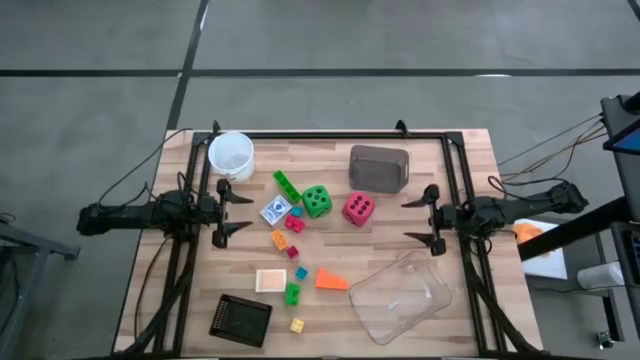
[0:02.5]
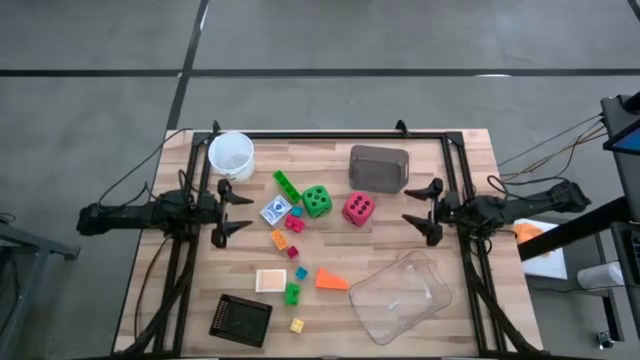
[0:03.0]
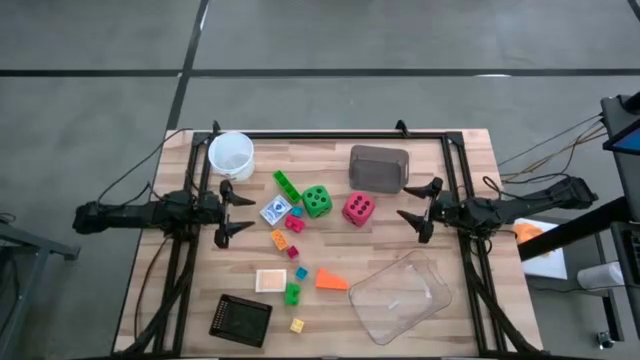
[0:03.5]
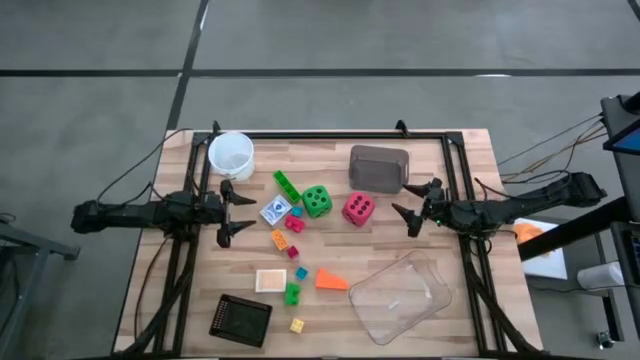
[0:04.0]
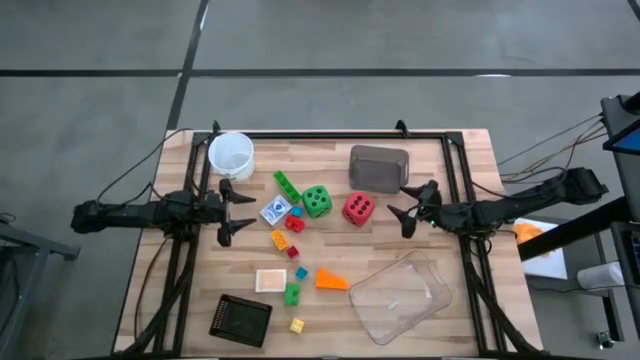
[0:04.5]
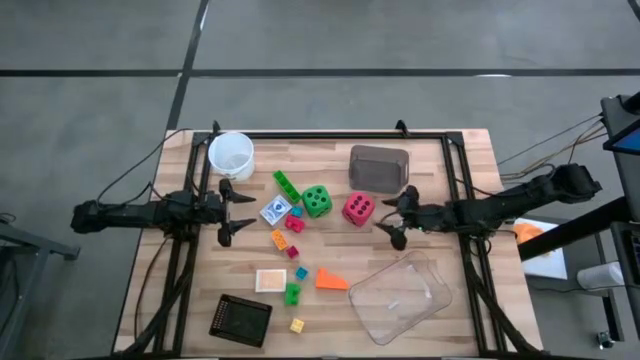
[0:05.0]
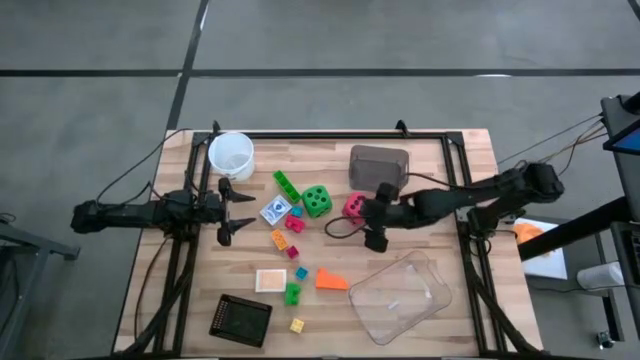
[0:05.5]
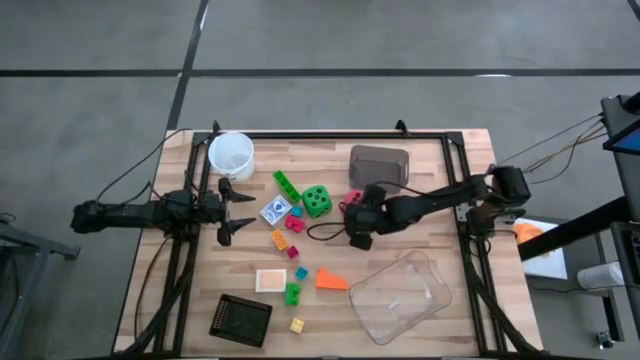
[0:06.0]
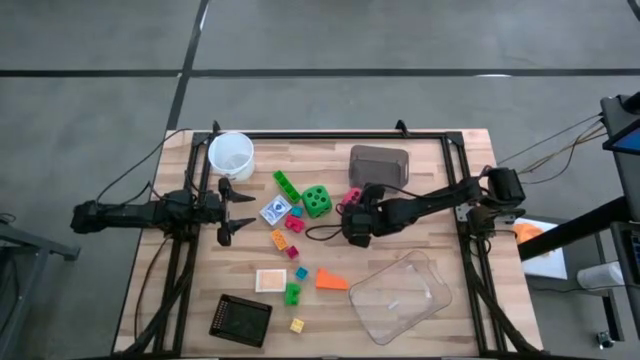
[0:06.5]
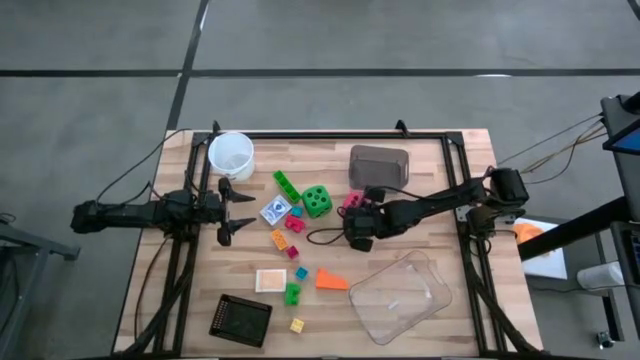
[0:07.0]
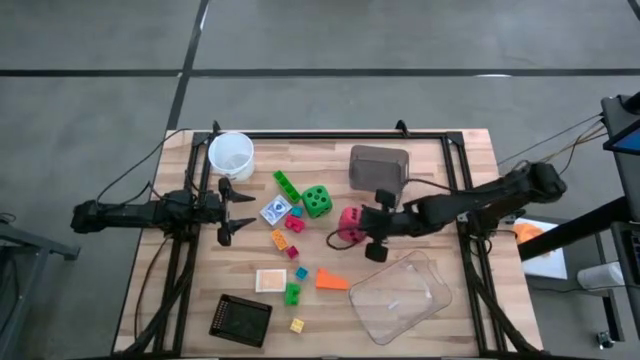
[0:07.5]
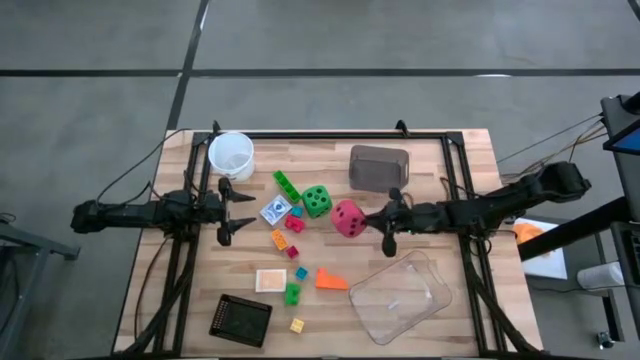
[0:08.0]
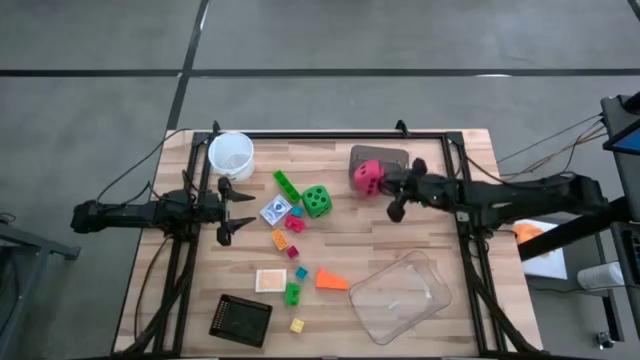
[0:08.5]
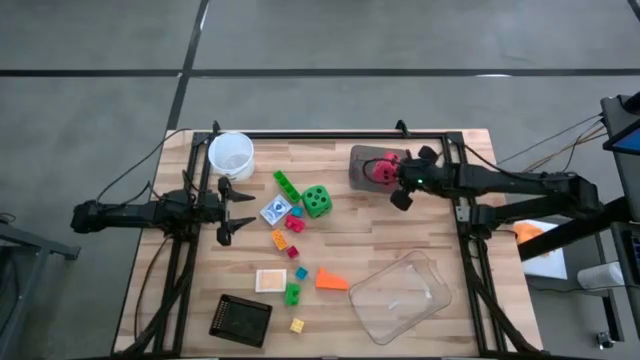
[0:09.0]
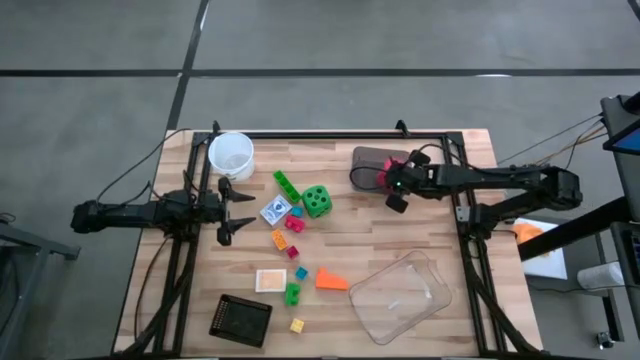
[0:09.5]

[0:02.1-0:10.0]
Task: Pick & Place Toys
Put the red die into the gray bin

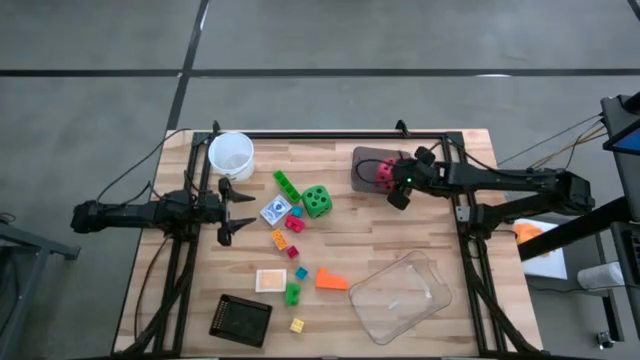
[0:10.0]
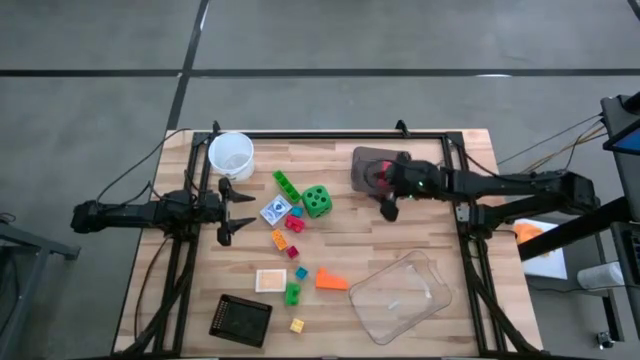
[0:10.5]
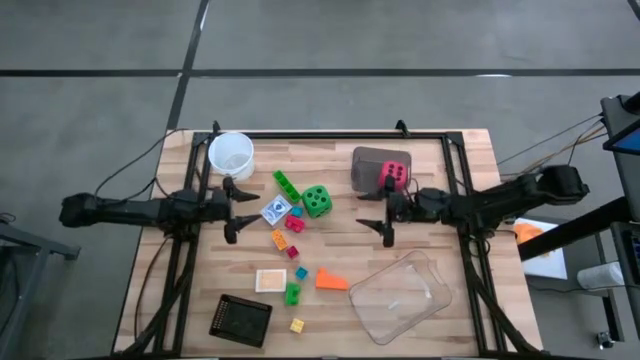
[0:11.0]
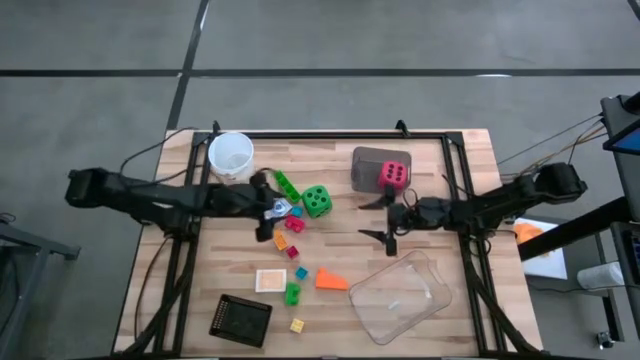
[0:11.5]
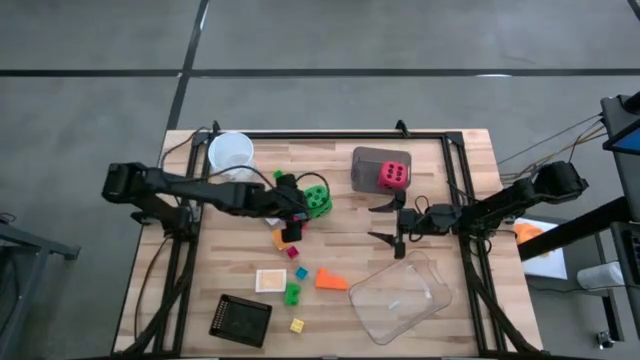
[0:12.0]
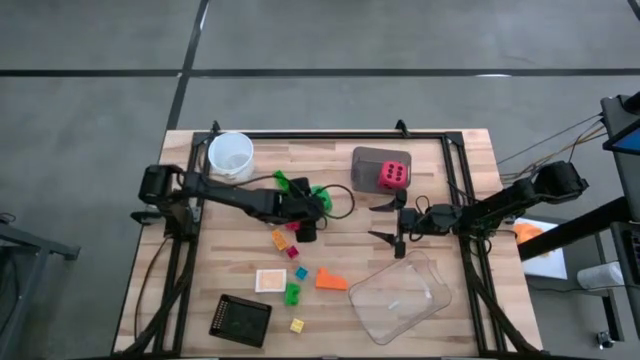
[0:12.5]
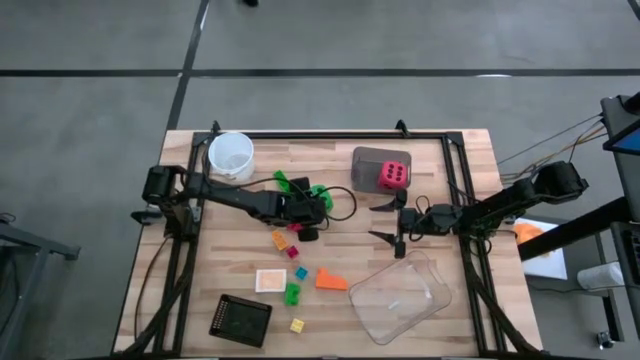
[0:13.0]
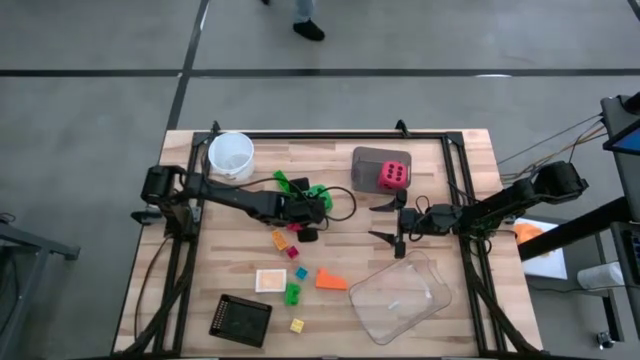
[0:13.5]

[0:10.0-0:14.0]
Put the green die into the gray bin

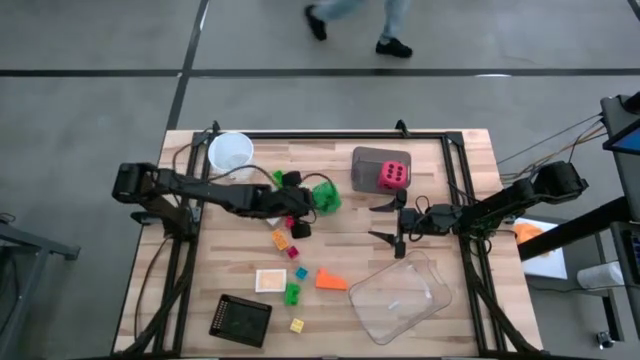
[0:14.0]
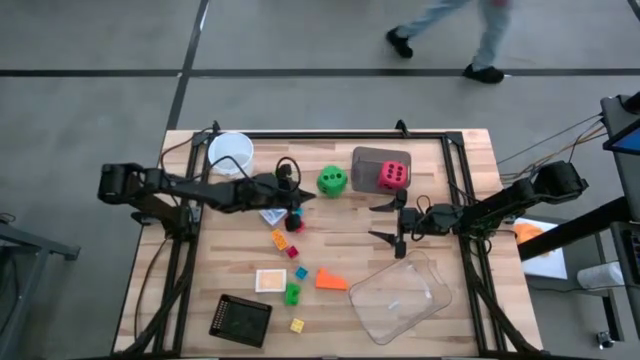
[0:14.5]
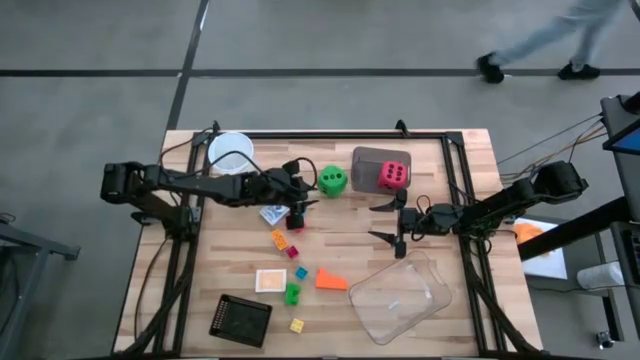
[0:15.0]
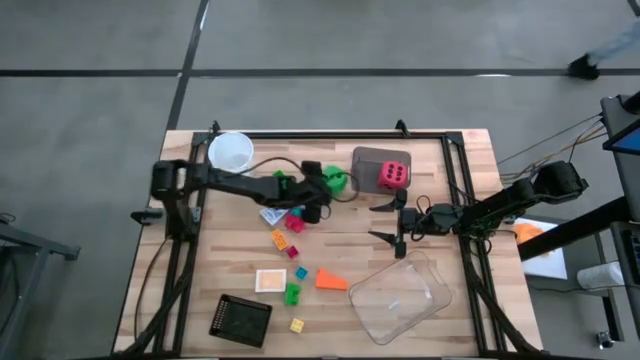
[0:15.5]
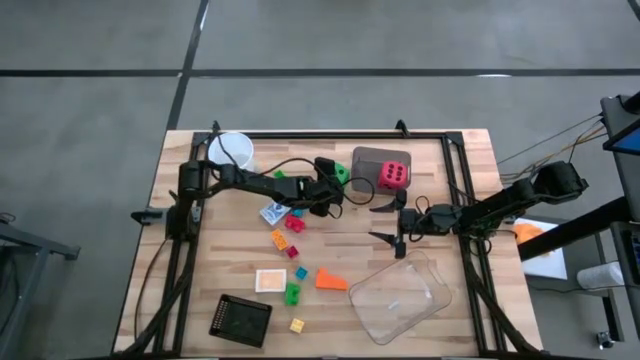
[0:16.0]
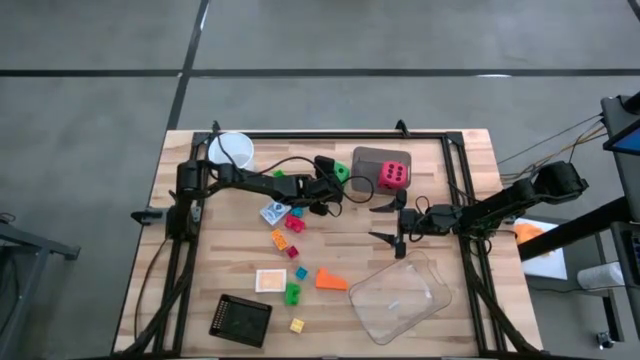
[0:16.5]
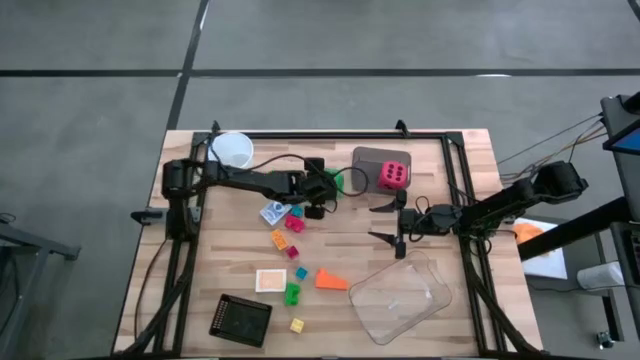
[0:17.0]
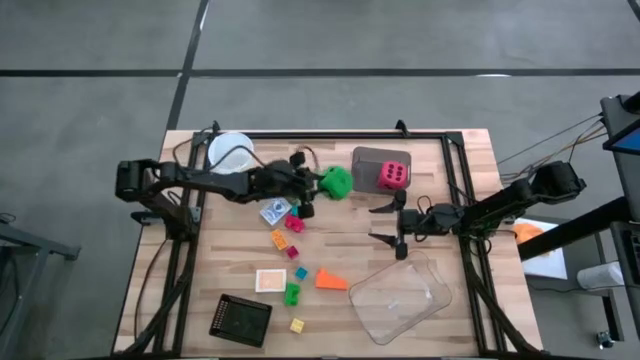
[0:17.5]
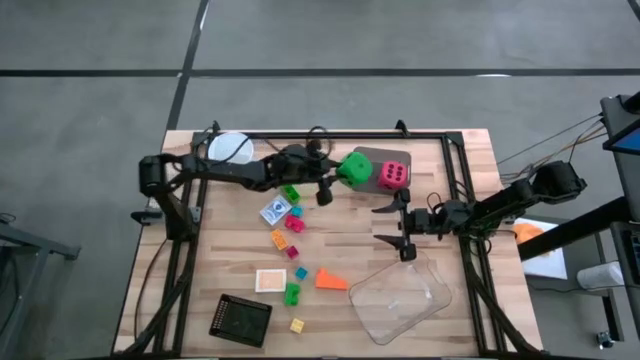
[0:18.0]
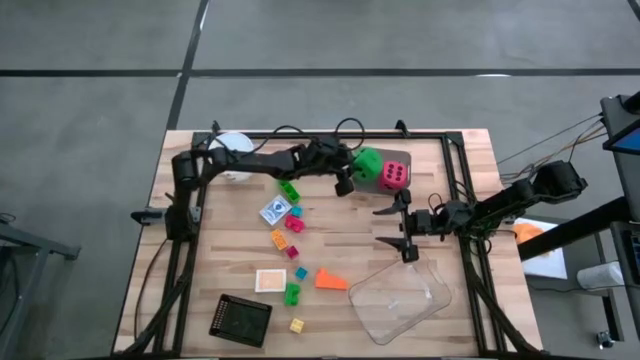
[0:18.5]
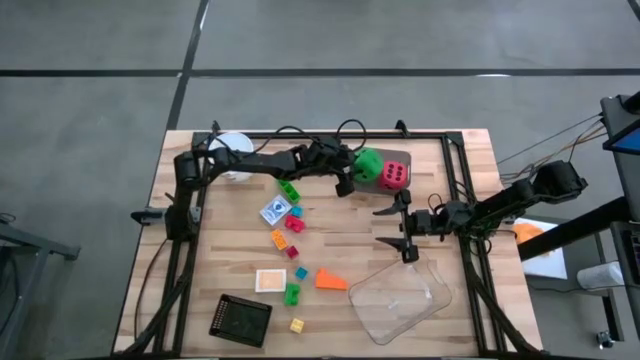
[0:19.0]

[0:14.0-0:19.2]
Put the green die into the gray bin

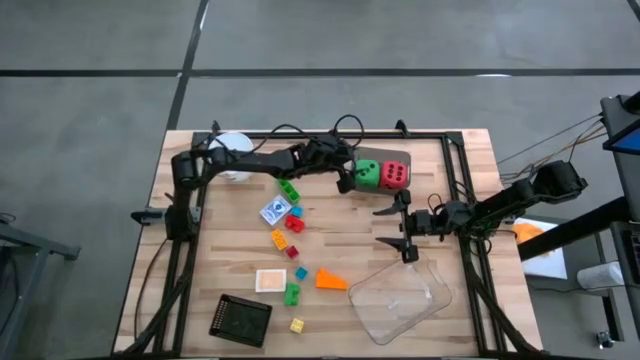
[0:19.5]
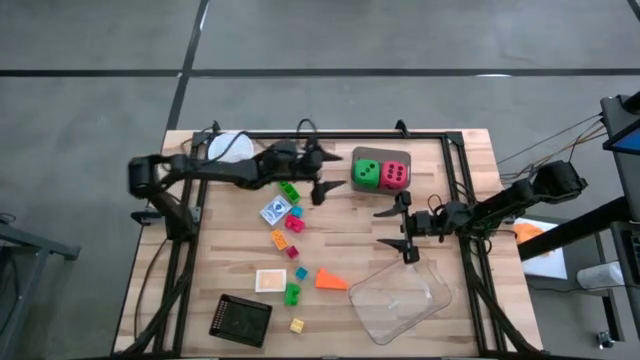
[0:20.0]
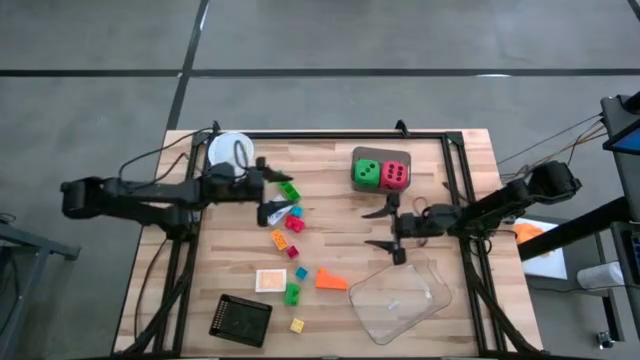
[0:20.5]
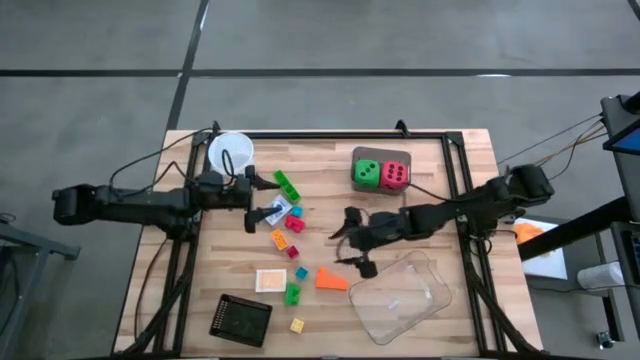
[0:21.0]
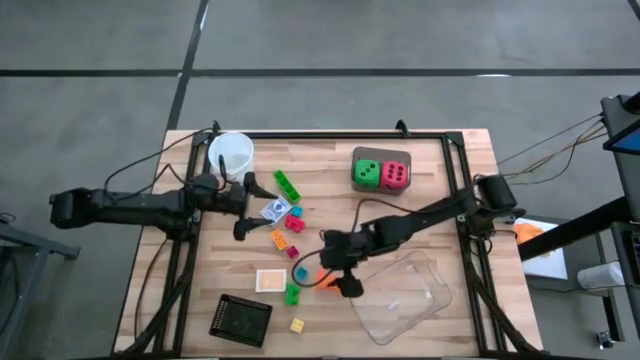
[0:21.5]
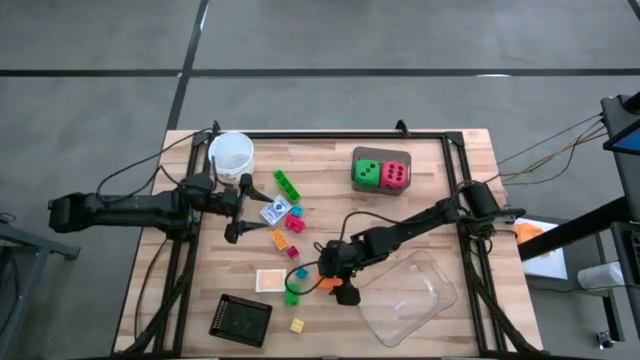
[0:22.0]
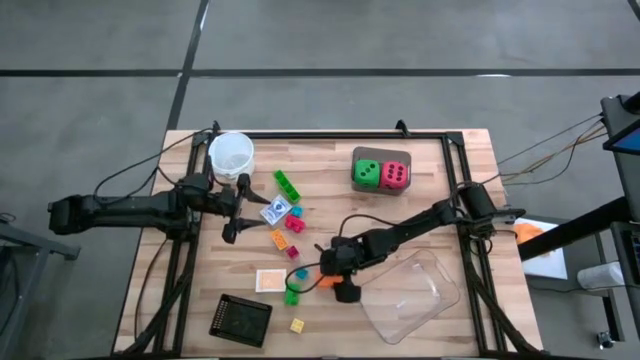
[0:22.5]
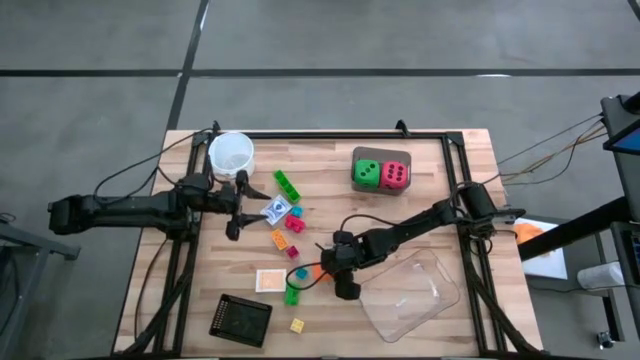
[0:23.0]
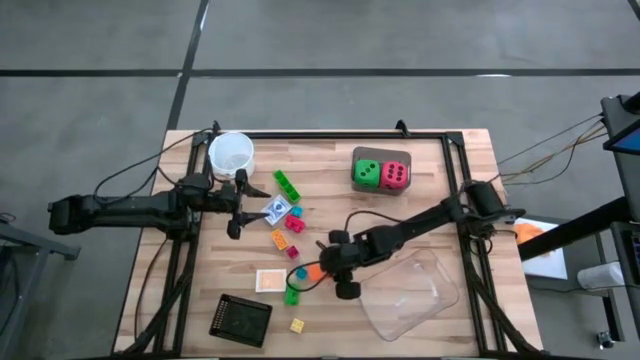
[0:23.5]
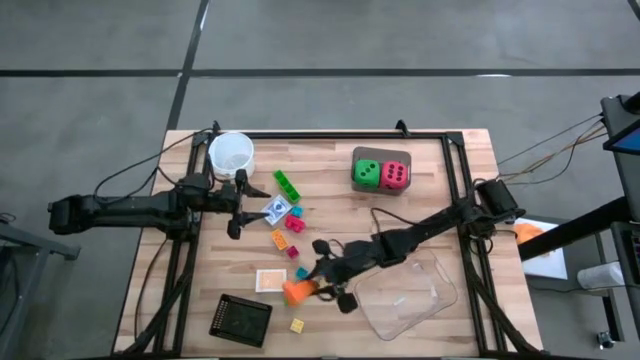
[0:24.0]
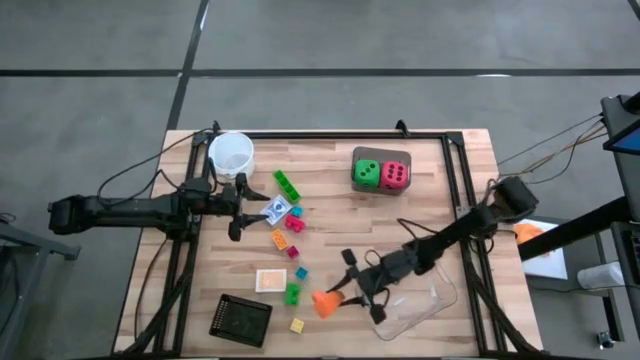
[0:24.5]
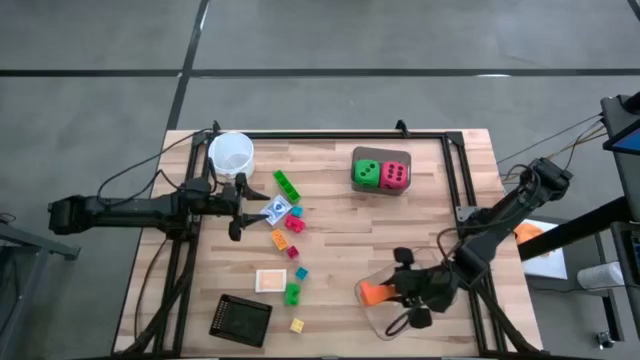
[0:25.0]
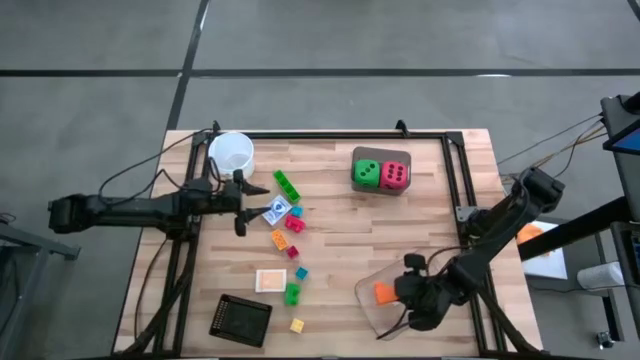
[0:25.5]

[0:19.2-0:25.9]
Put the orange game piece into the transparent bin
